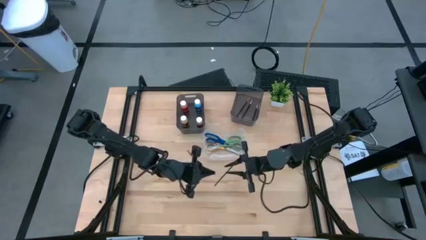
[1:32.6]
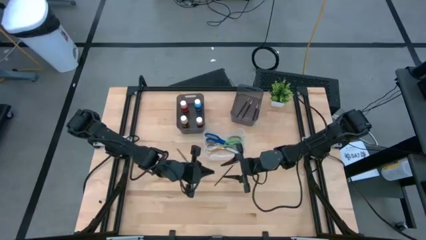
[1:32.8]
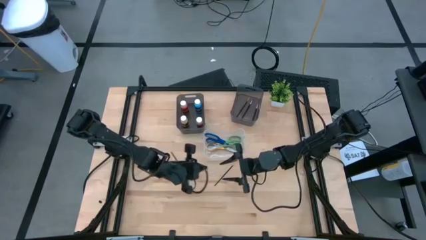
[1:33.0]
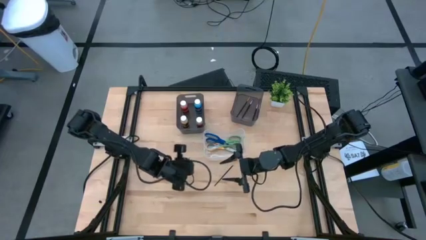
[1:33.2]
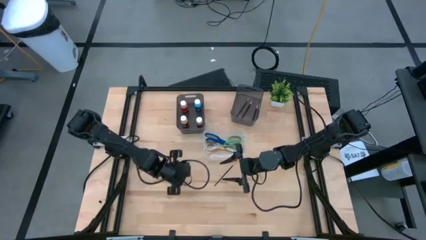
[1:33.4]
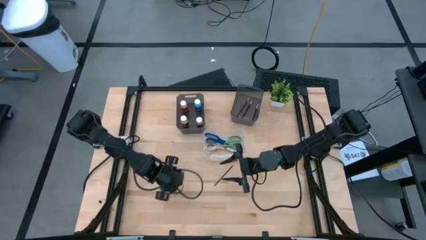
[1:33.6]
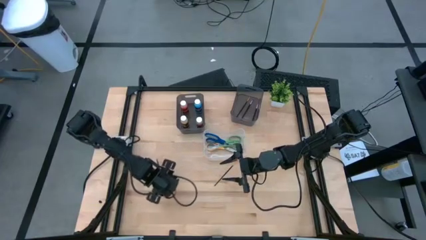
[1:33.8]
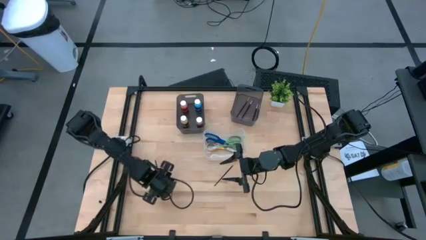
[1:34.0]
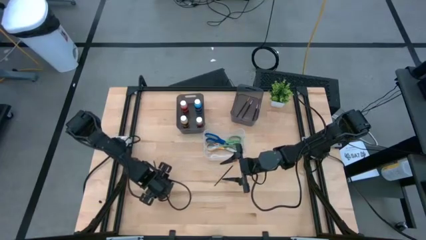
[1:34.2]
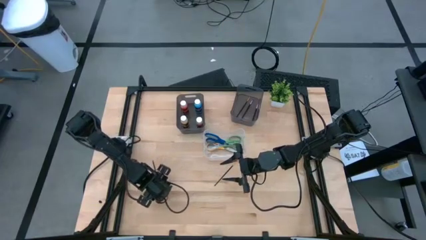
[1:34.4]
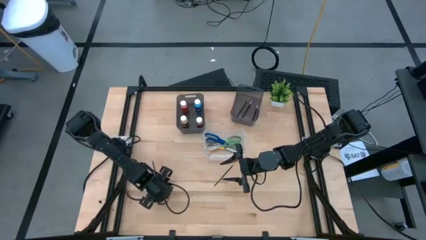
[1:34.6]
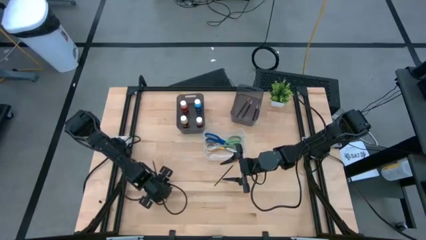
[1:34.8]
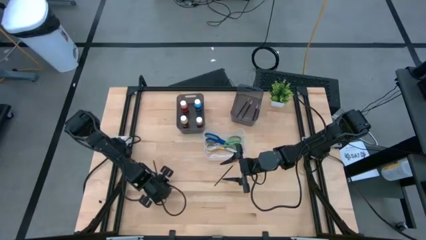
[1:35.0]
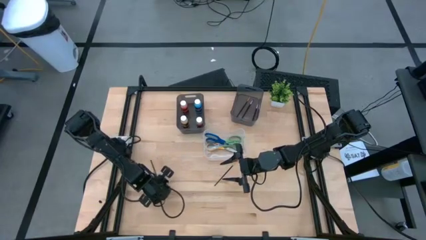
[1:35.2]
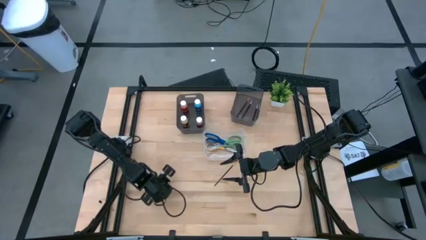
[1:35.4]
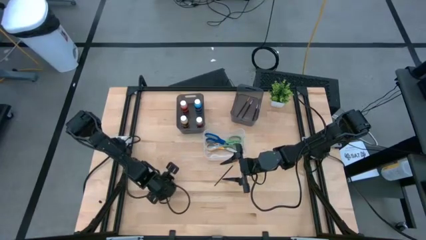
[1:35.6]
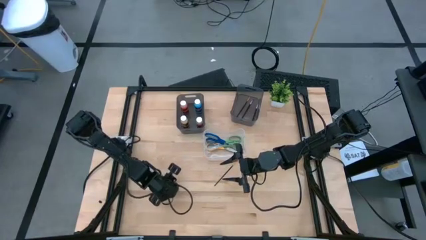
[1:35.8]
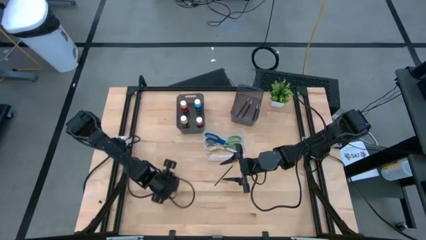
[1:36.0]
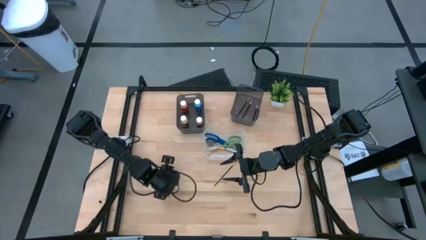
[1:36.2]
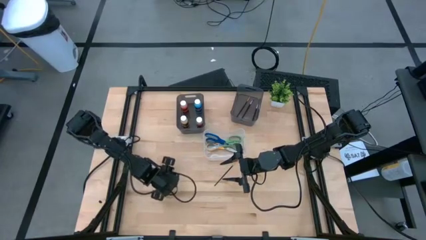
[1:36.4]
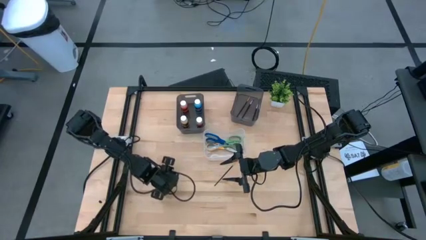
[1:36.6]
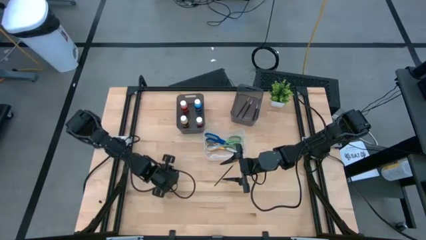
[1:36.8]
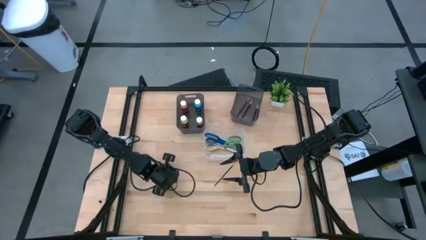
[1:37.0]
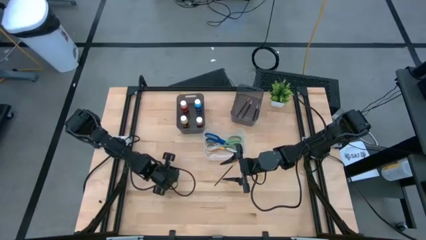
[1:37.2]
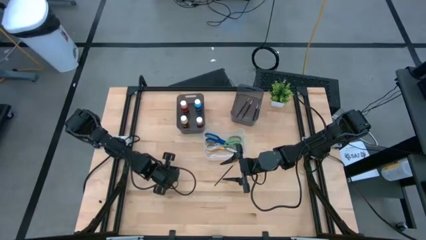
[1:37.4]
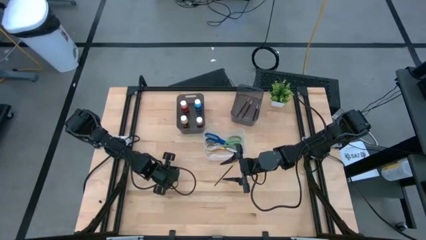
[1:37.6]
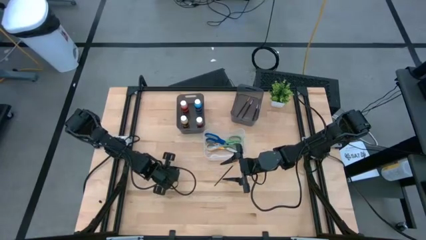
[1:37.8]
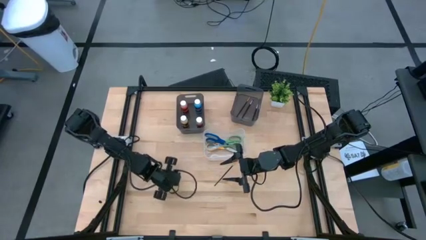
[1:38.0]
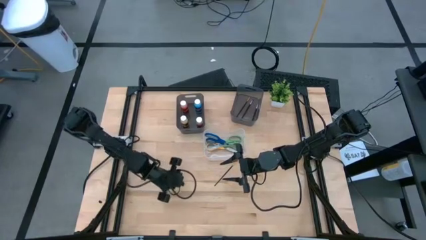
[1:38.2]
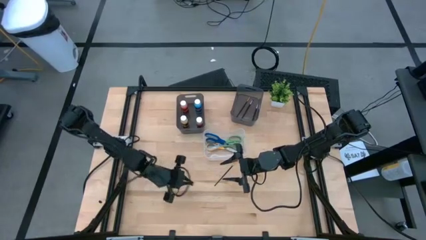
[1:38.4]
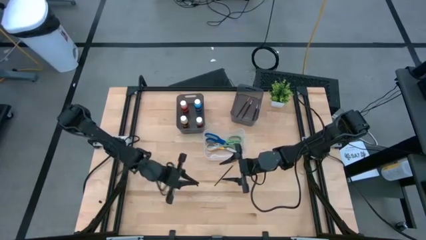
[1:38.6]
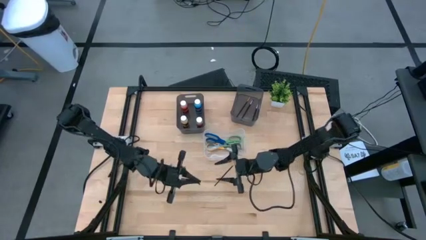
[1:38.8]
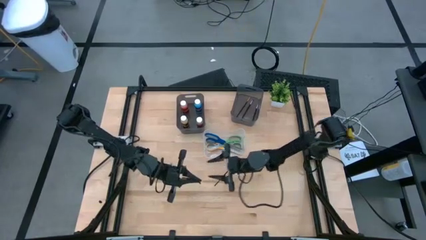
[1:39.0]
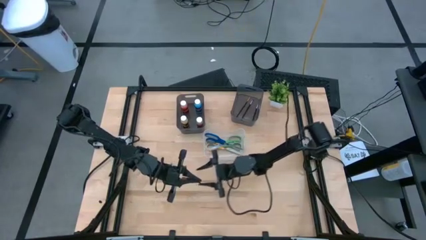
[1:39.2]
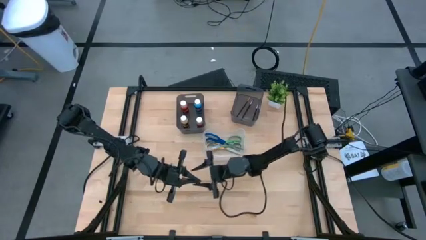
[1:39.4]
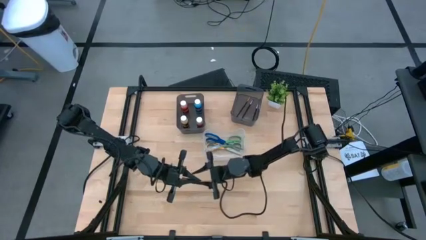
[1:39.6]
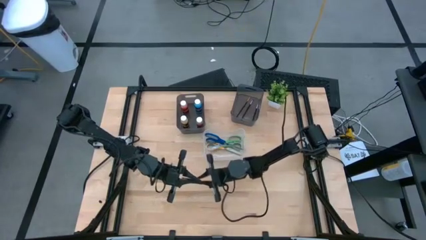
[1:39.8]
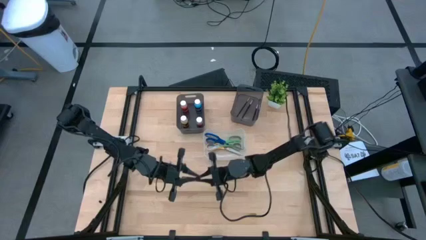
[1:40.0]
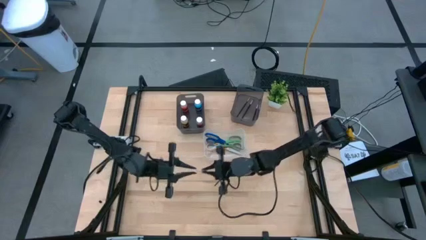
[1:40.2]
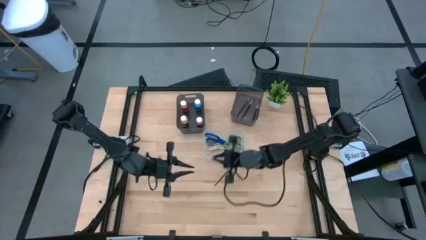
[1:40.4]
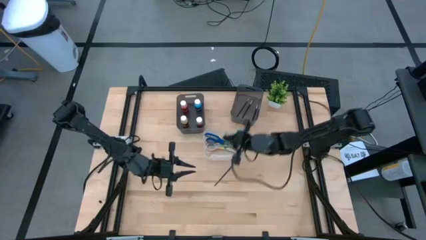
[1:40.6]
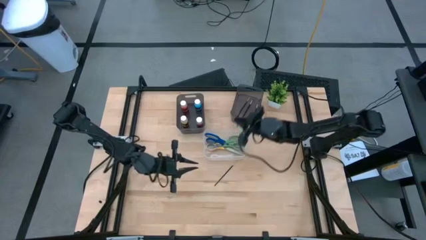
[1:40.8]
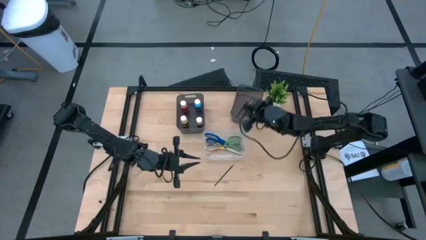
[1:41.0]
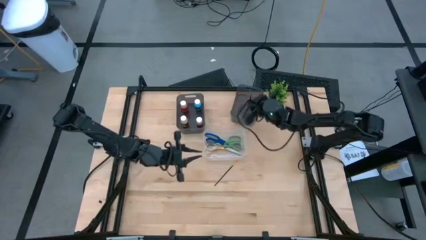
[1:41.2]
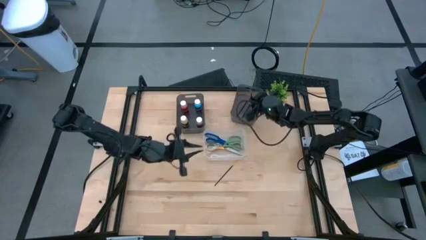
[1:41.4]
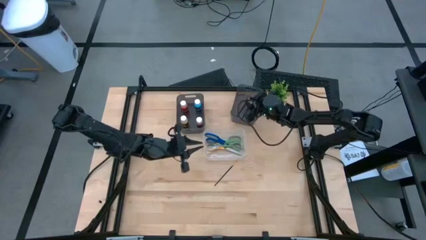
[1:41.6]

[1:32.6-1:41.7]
Task: Pick & Place Paint Supplies
Put the bottom black and gold brush into the right black bin

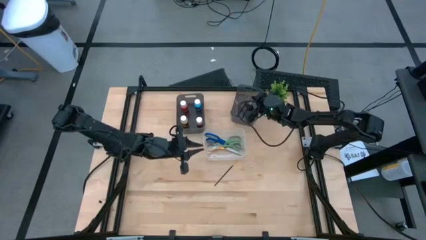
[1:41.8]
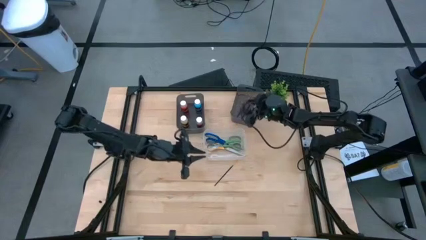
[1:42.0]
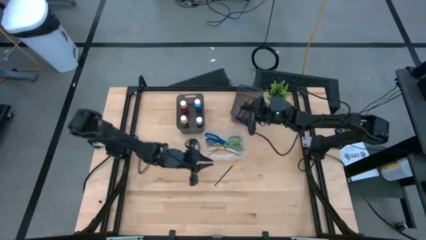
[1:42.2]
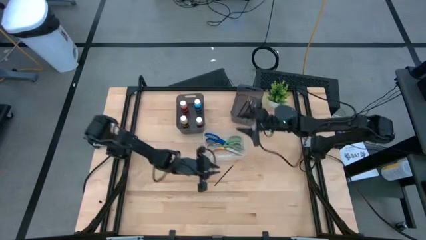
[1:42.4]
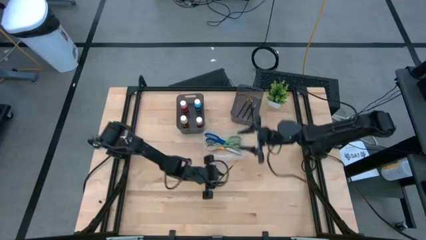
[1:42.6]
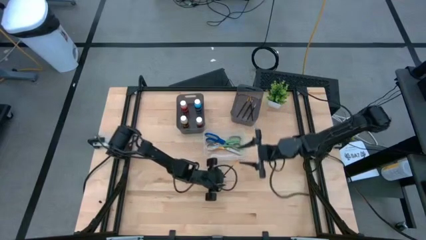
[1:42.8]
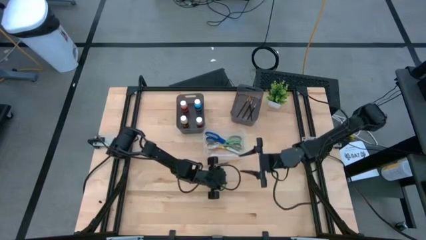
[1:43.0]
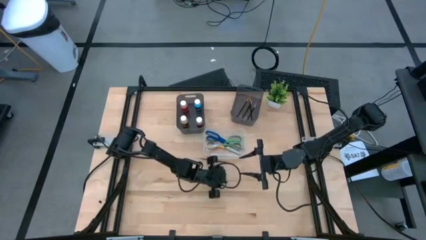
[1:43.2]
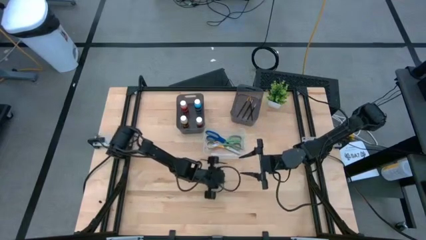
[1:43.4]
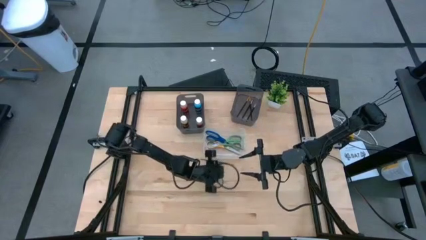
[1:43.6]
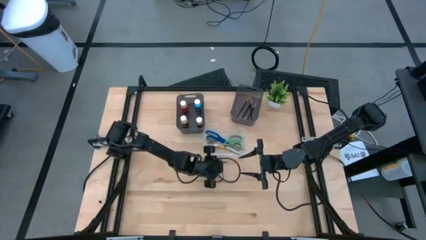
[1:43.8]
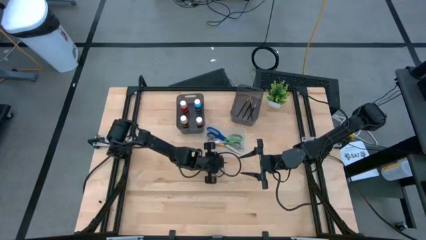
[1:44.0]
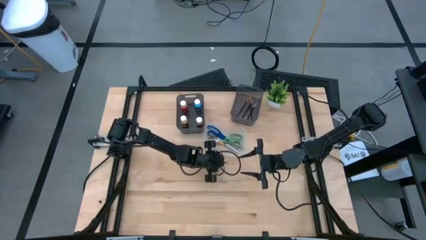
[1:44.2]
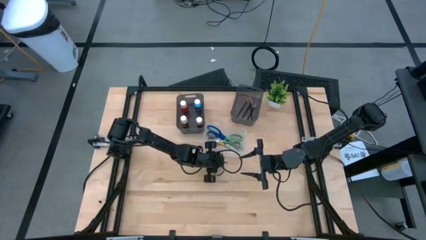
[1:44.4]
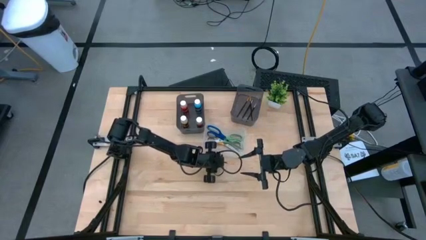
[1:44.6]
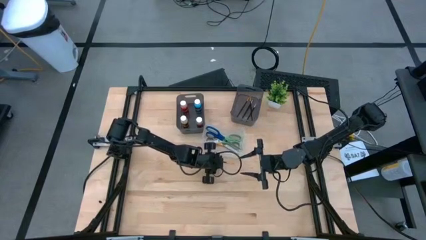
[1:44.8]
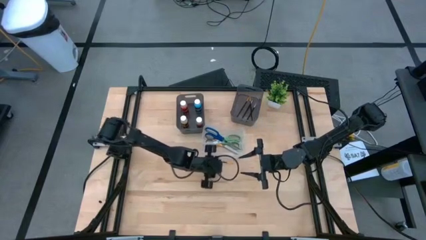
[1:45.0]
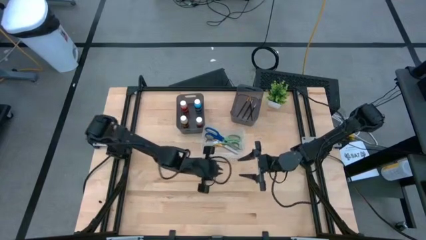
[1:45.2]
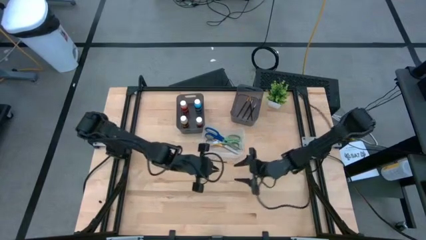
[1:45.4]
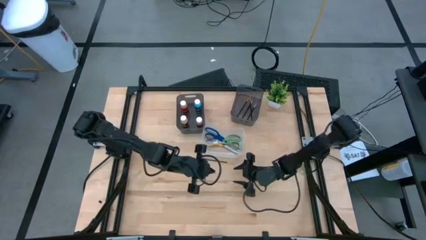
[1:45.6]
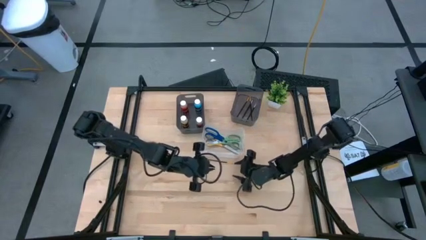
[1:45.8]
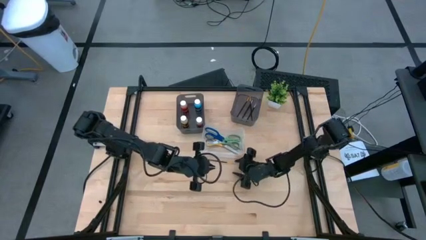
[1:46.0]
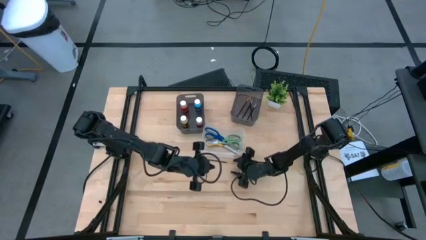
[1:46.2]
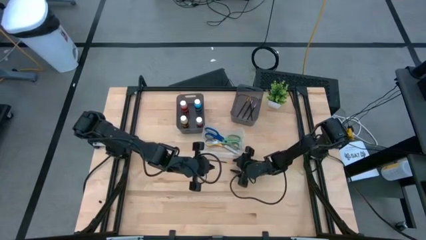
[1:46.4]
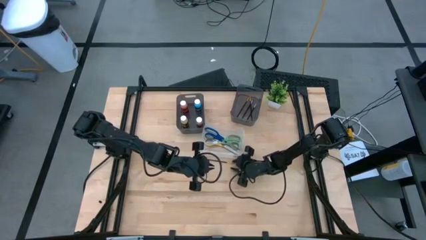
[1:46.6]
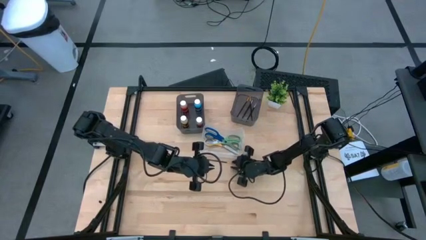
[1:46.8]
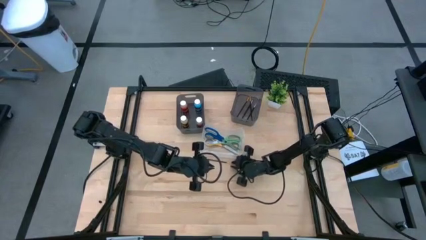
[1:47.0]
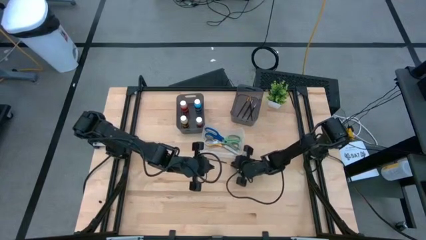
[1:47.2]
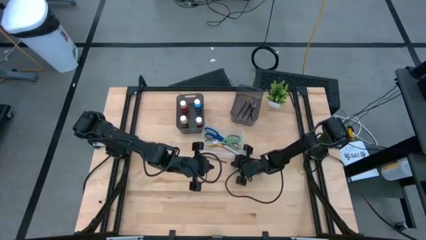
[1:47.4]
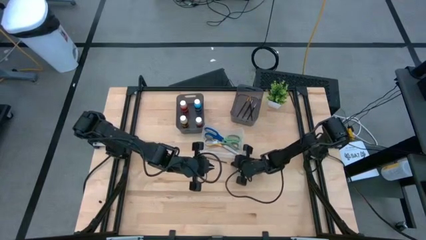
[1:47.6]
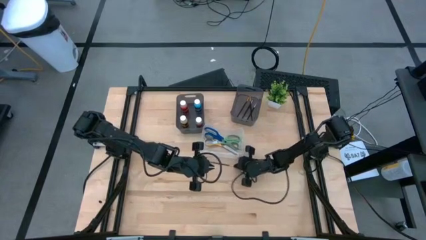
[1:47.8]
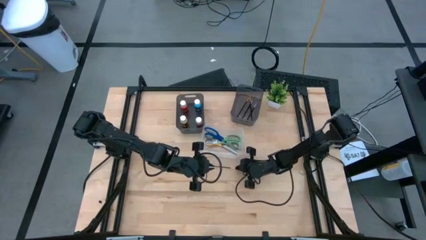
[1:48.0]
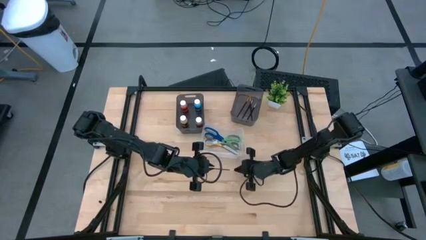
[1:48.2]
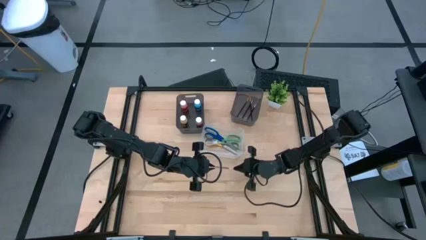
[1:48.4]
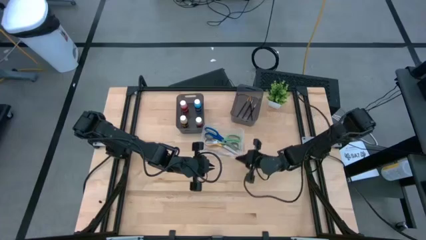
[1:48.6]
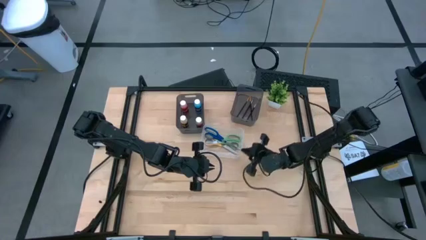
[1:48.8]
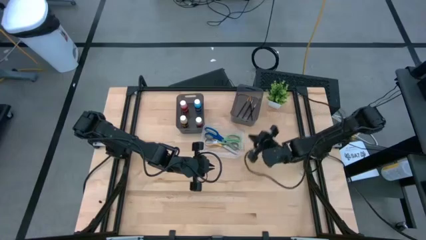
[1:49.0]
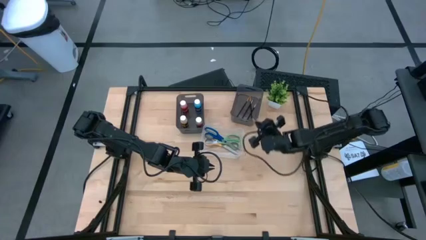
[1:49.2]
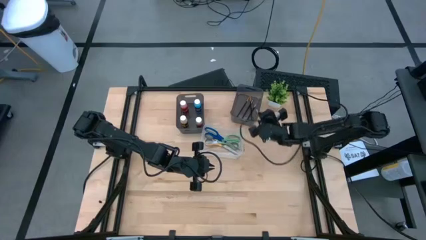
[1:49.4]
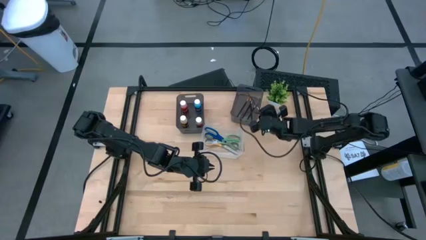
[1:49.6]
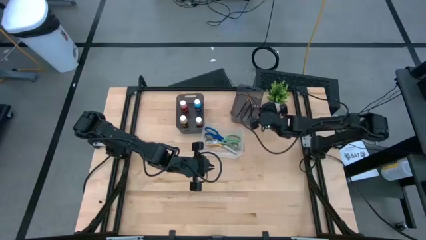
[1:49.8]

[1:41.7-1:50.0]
Put the black and gold brush into the right black bin
